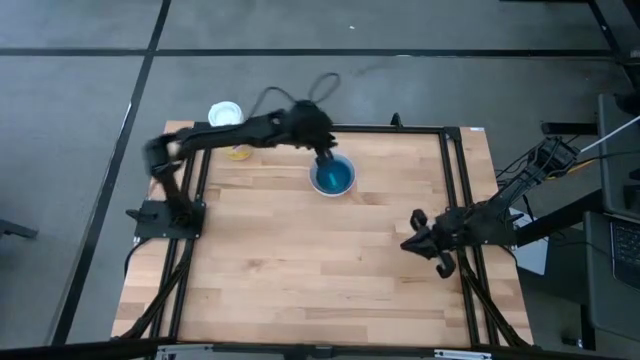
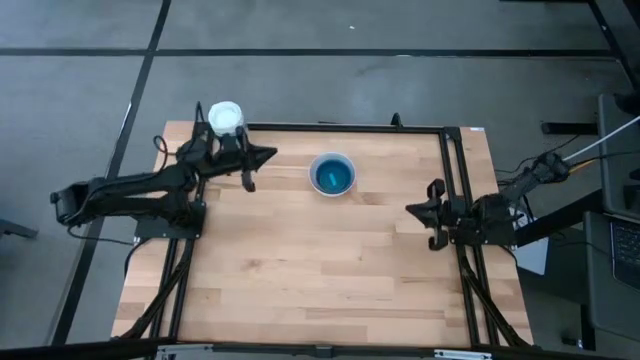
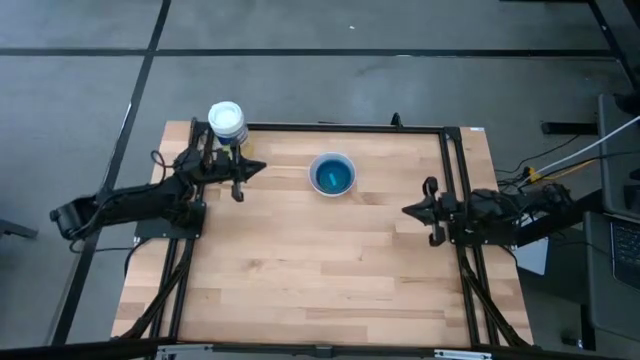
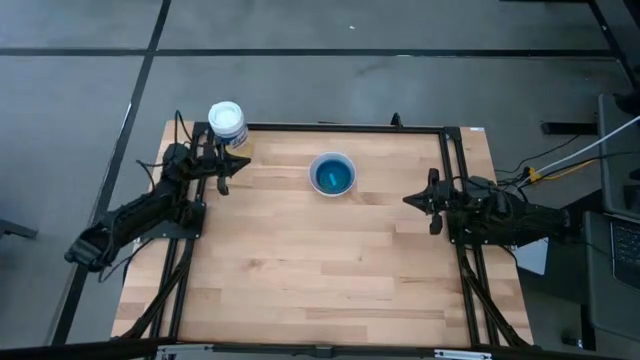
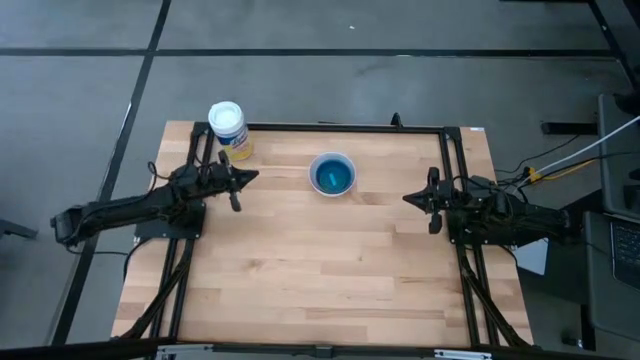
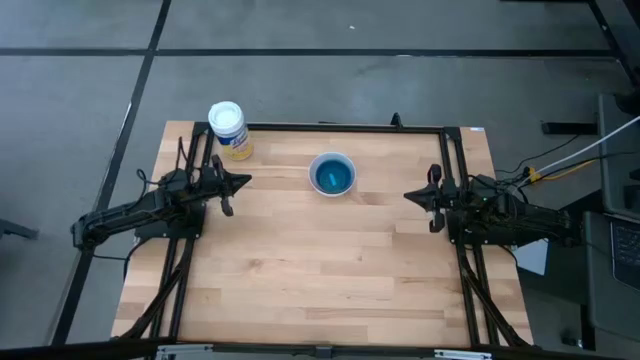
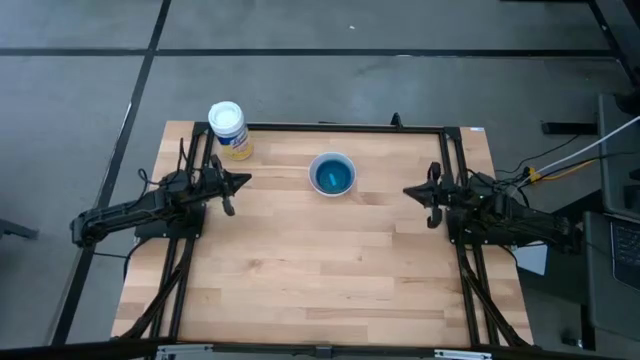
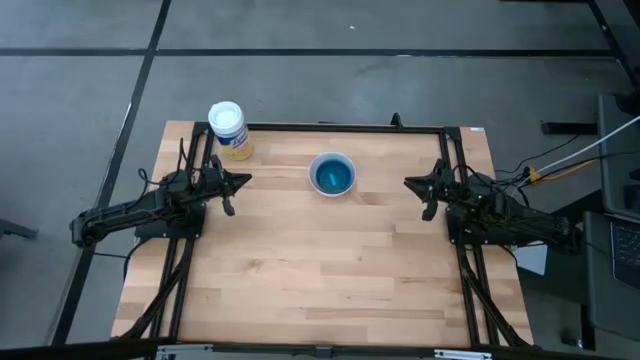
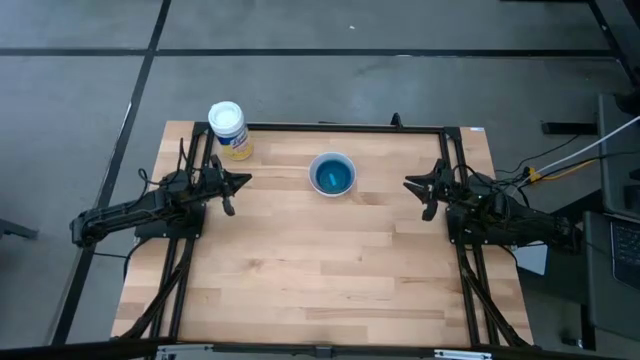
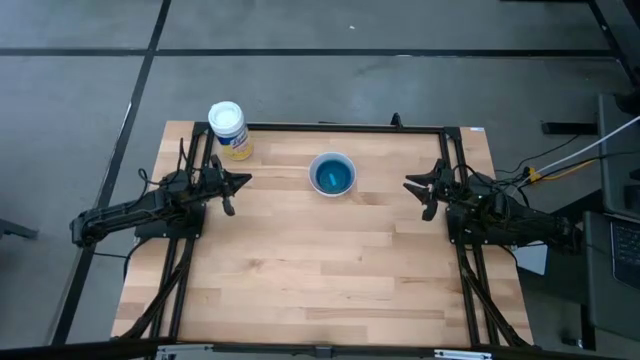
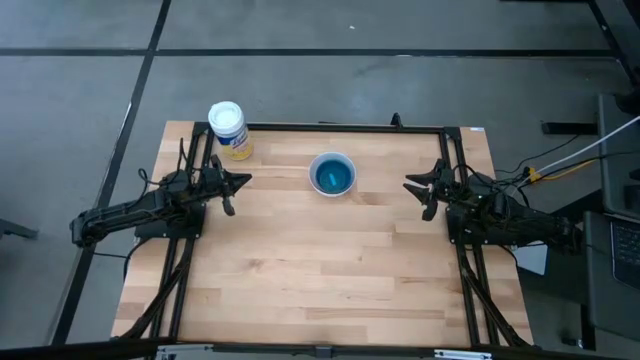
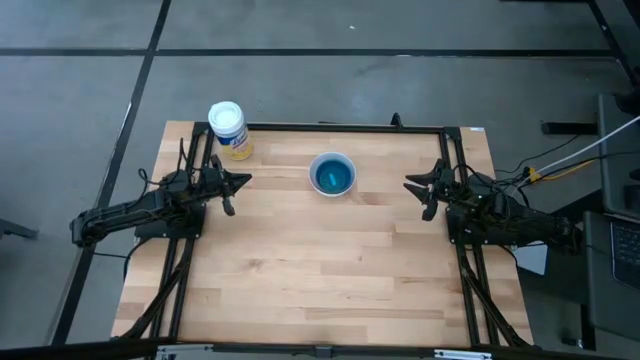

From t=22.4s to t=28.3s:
Return to Home Position

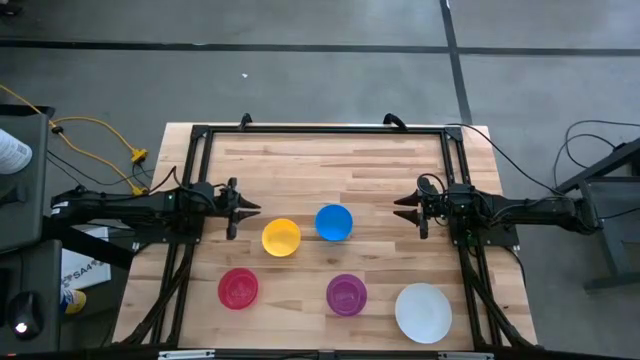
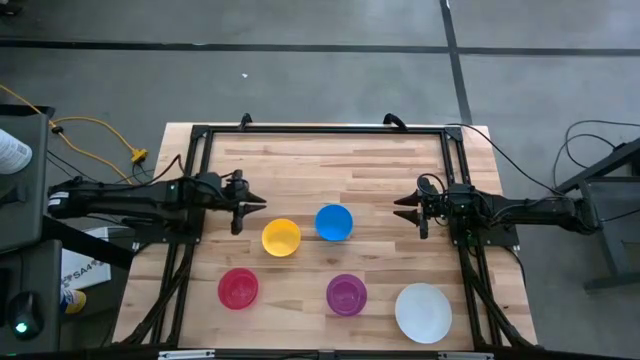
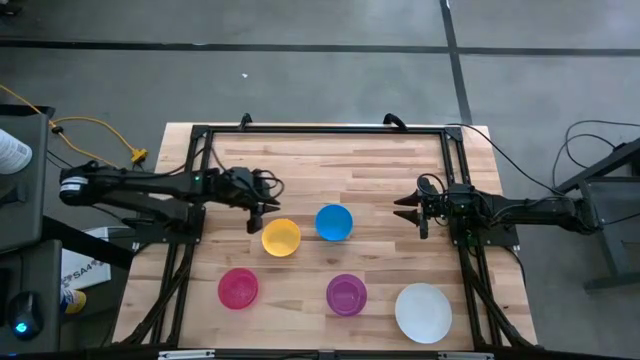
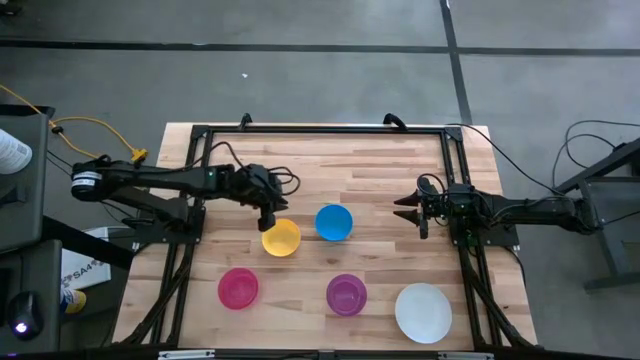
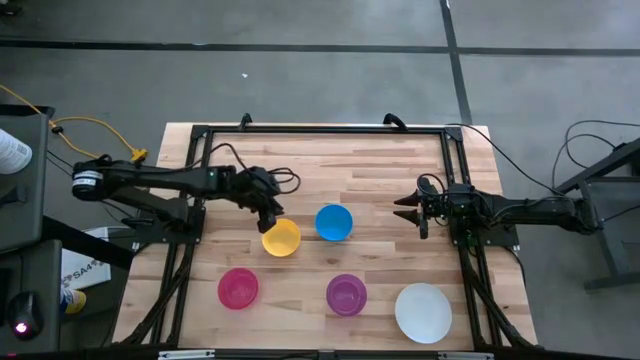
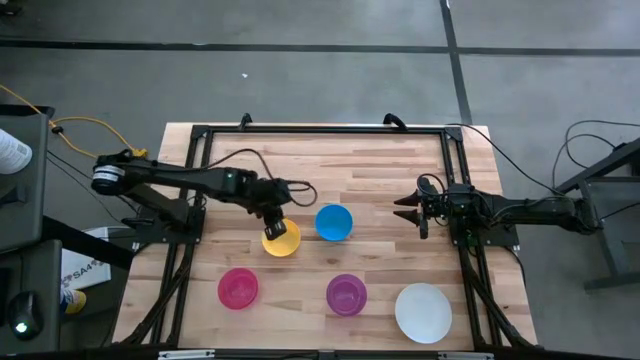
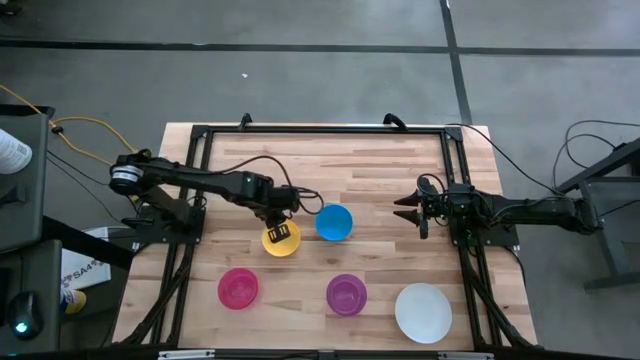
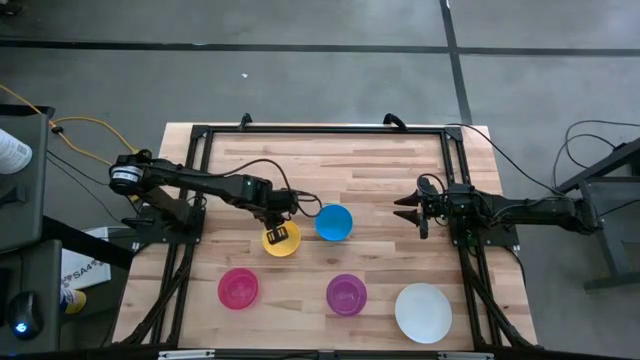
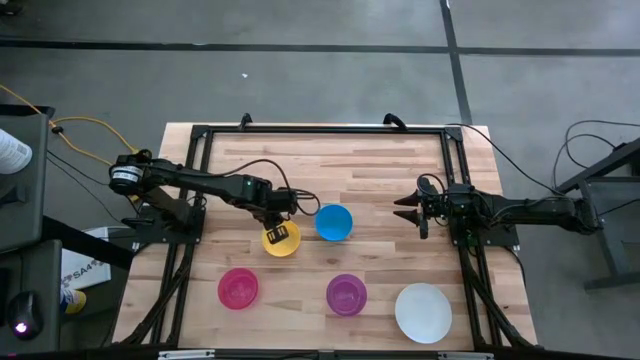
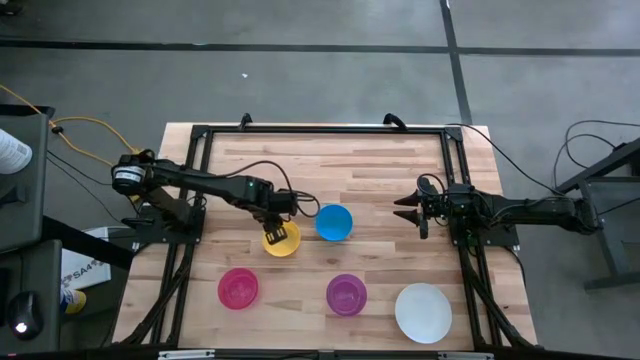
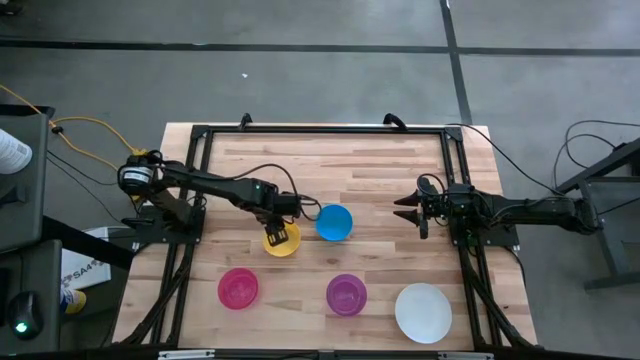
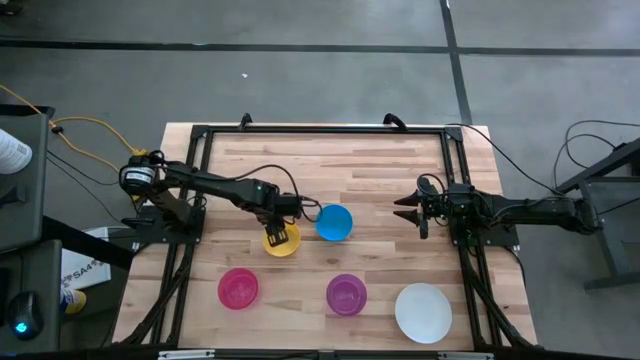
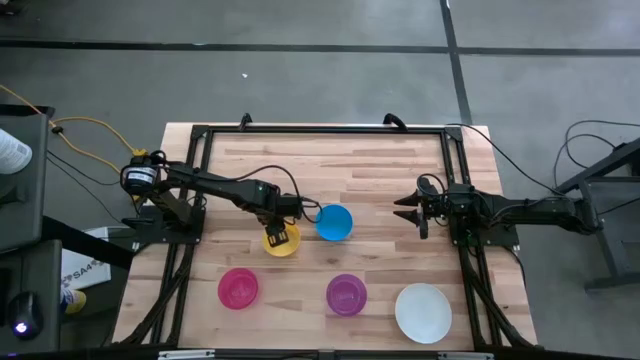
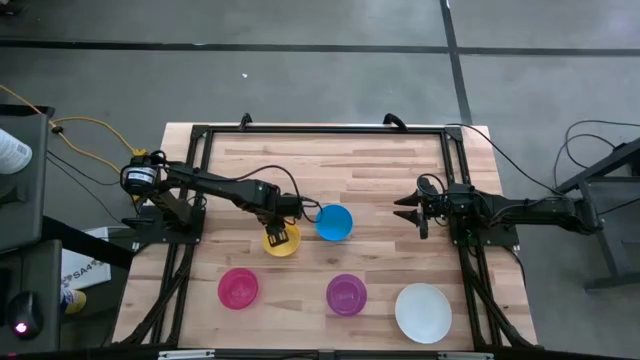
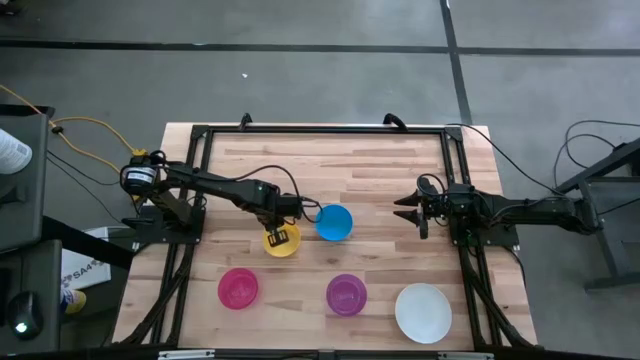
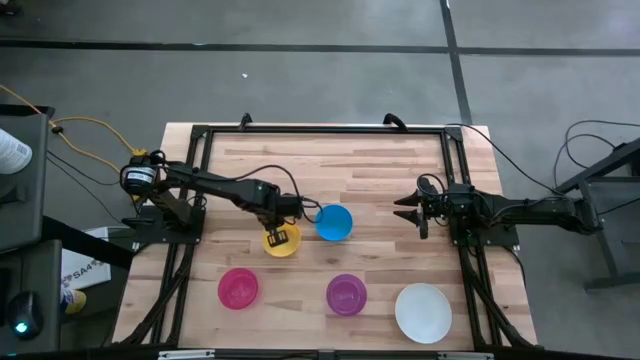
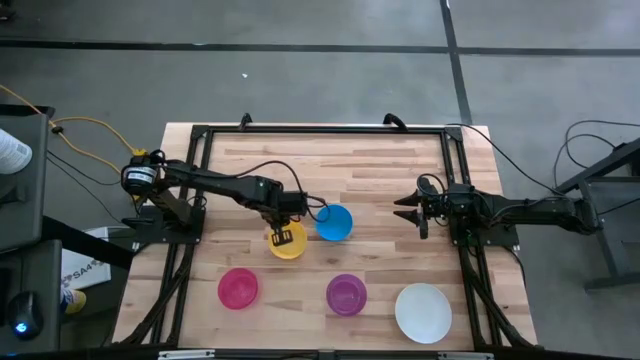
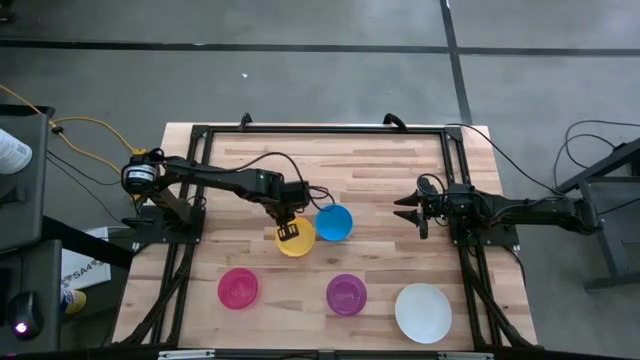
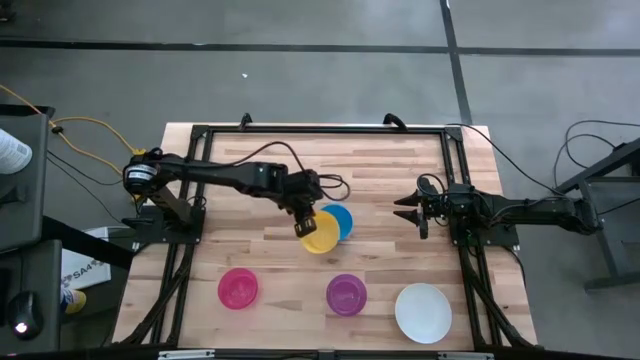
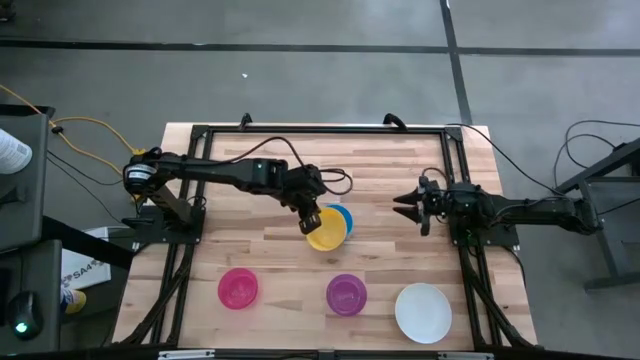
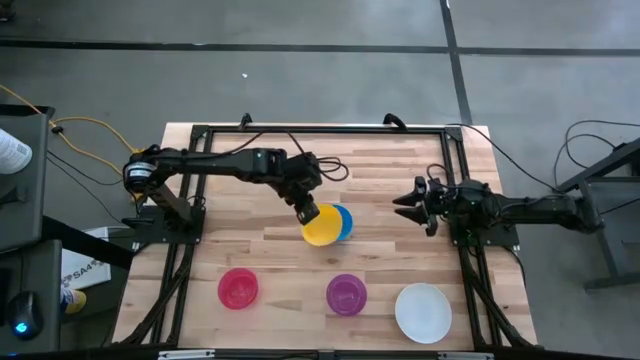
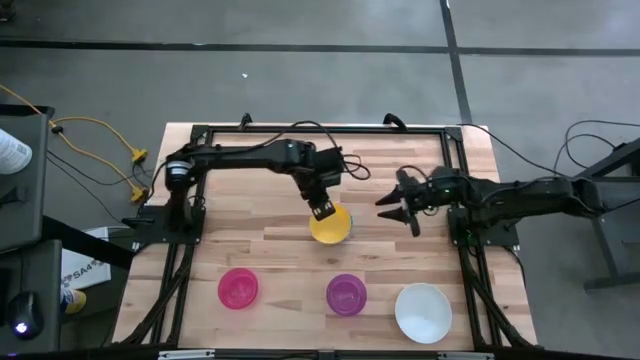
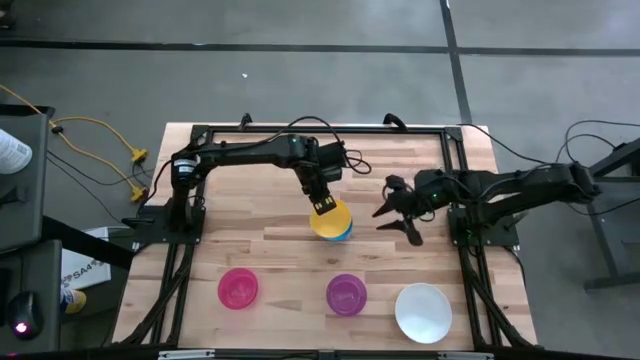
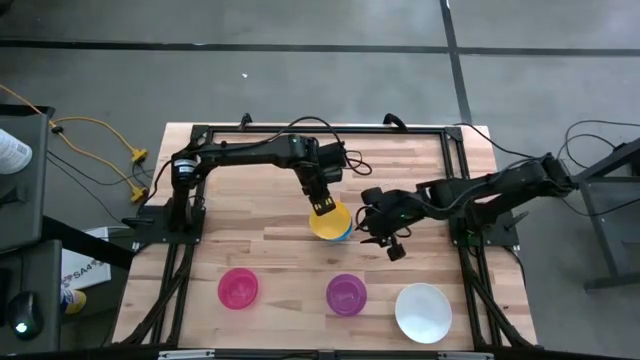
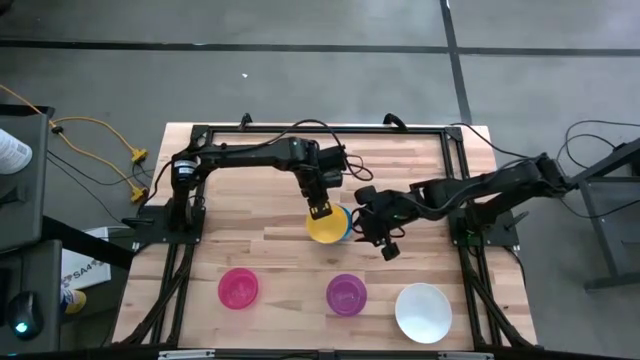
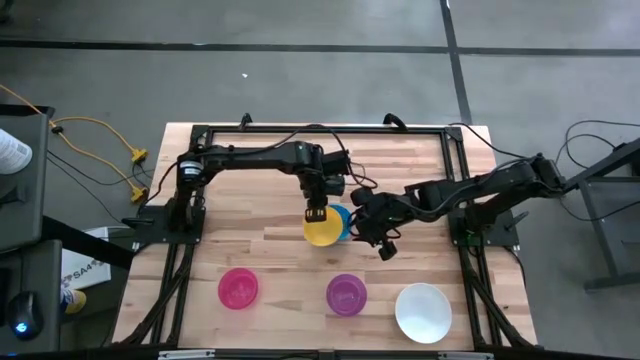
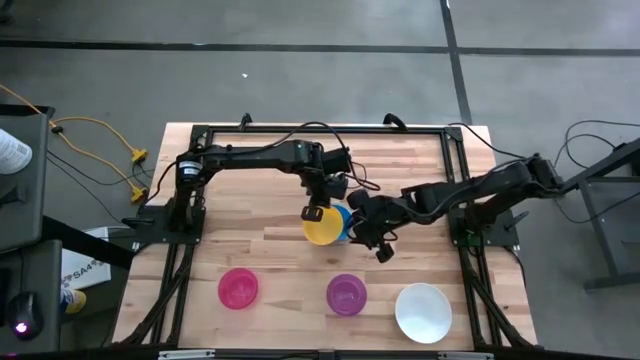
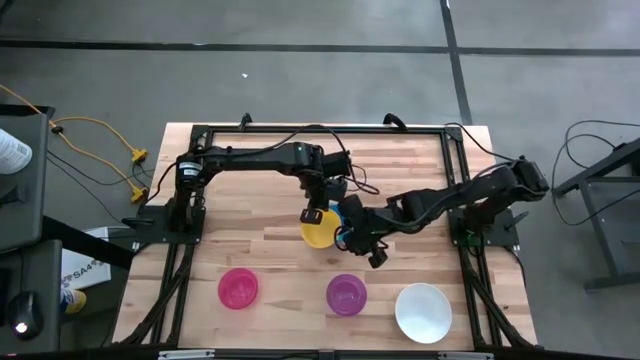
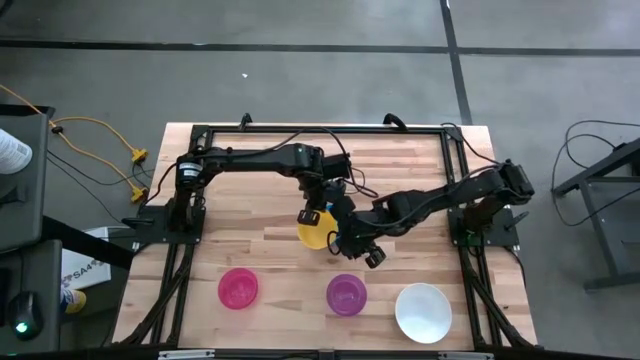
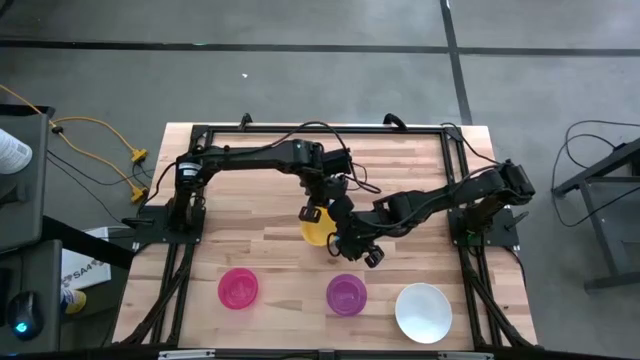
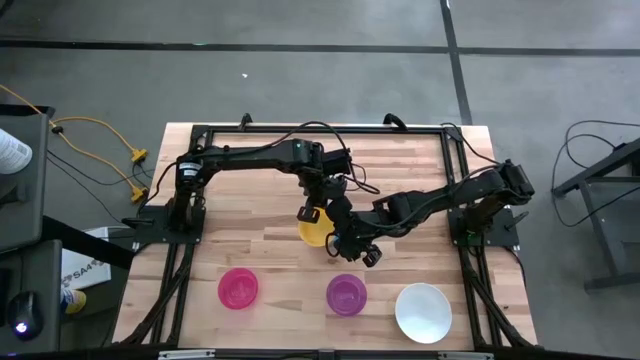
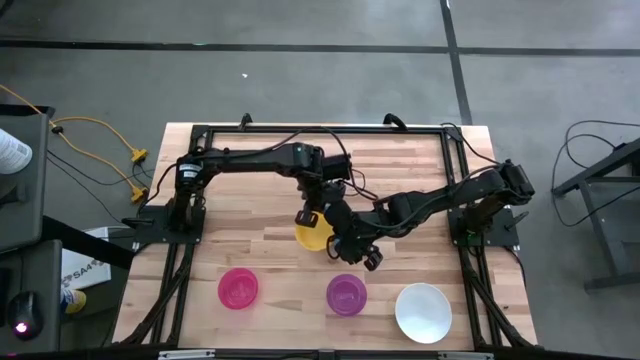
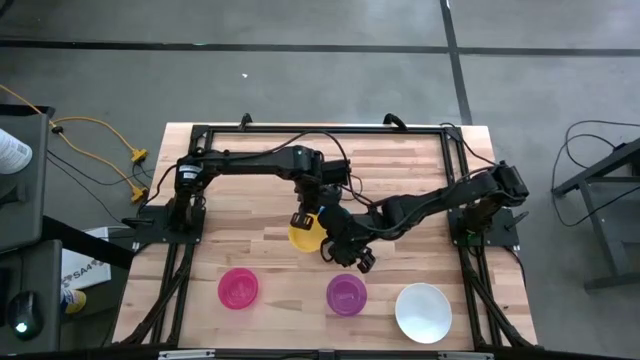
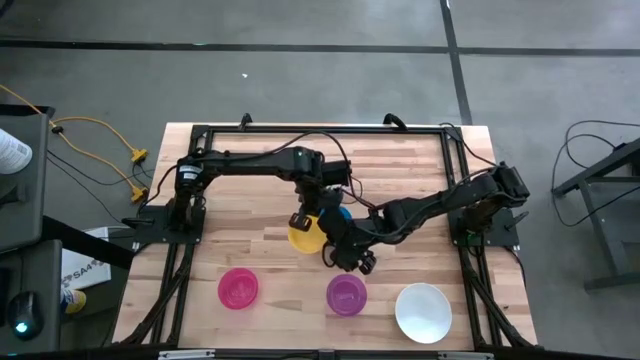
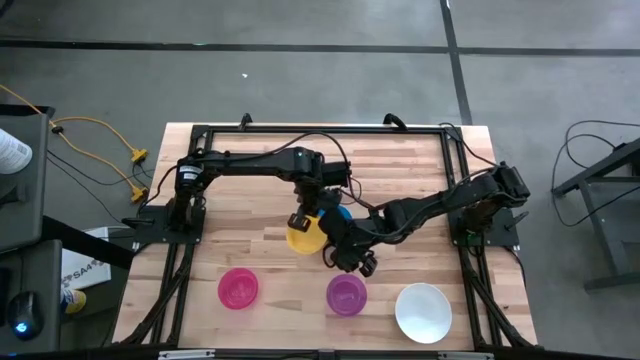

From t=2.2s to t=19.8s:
Stack the yellow bowl on the white bowl
